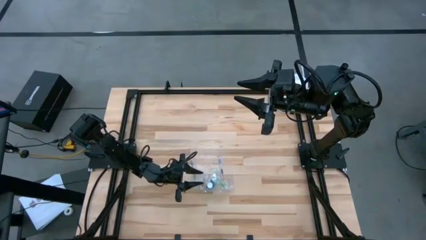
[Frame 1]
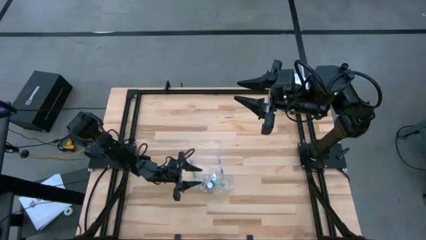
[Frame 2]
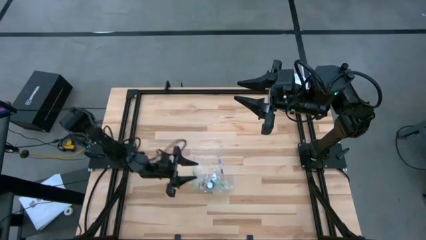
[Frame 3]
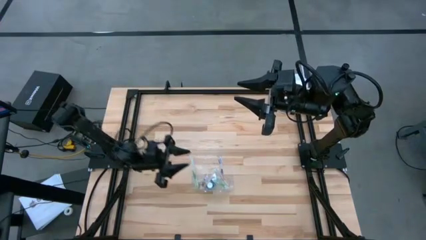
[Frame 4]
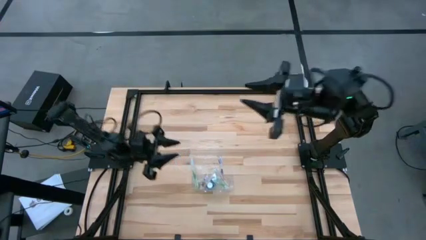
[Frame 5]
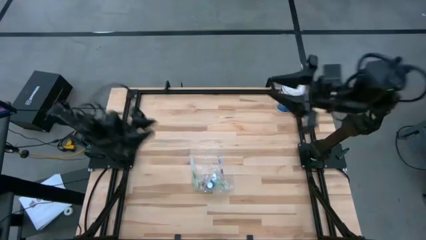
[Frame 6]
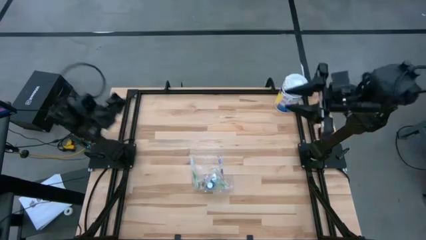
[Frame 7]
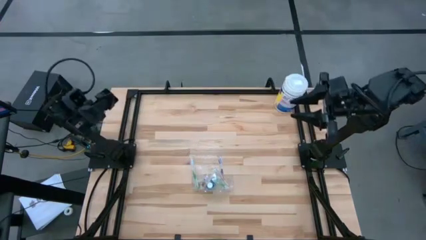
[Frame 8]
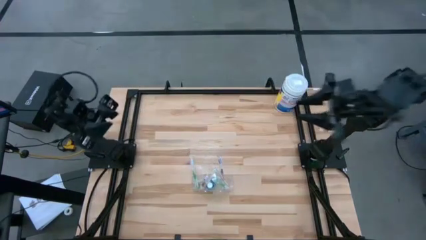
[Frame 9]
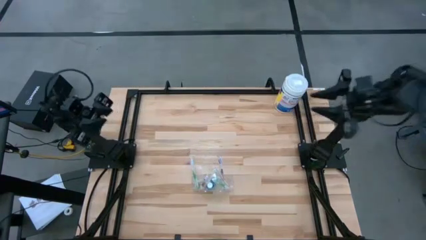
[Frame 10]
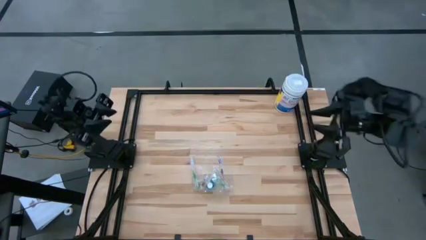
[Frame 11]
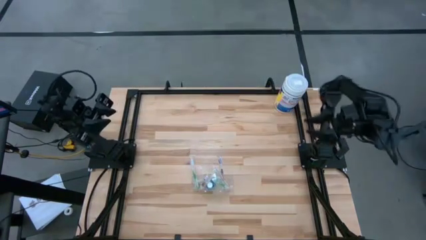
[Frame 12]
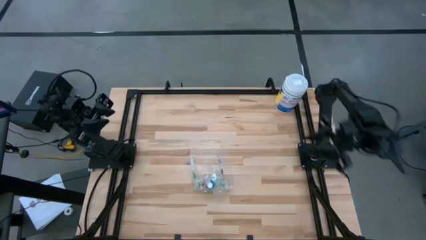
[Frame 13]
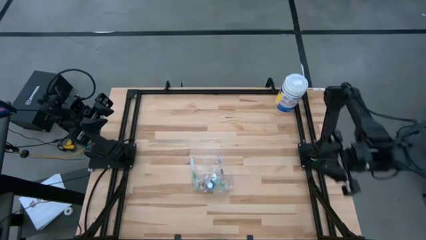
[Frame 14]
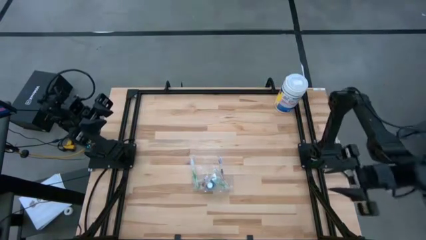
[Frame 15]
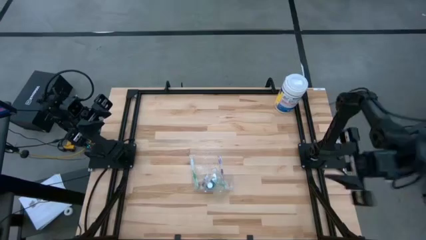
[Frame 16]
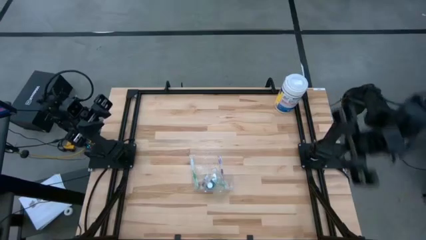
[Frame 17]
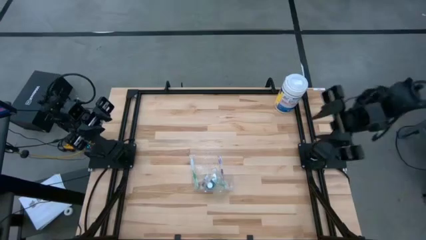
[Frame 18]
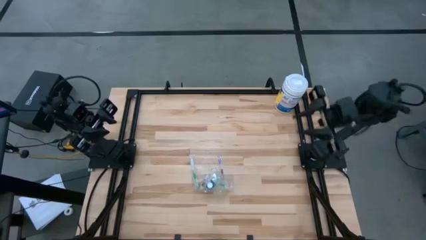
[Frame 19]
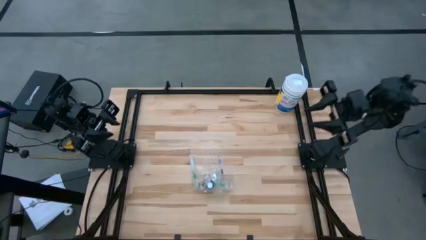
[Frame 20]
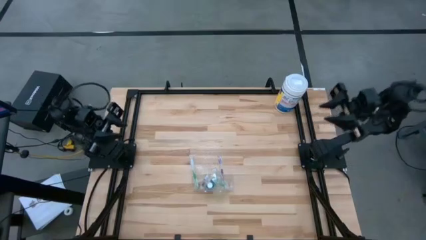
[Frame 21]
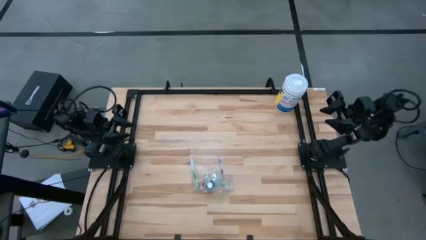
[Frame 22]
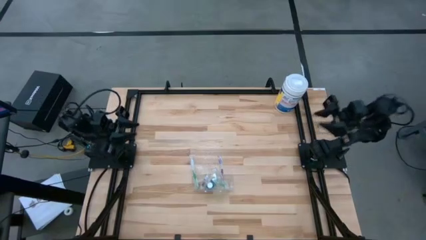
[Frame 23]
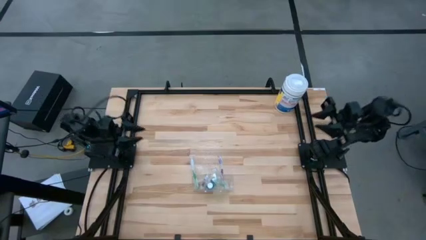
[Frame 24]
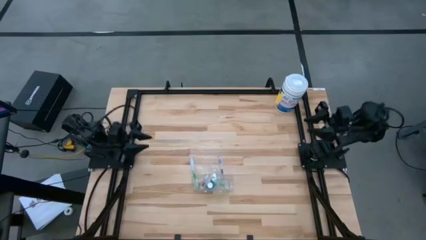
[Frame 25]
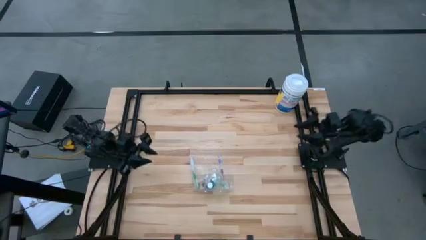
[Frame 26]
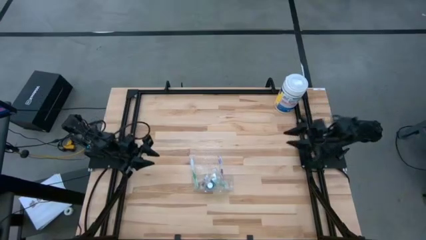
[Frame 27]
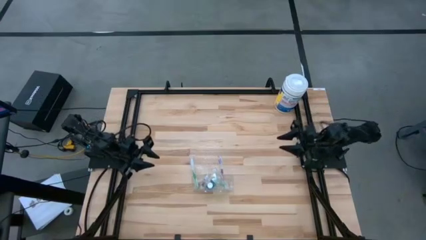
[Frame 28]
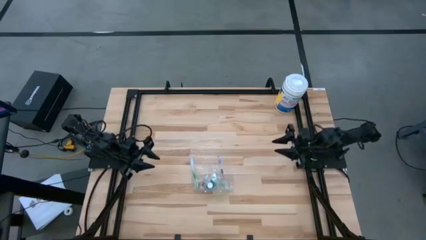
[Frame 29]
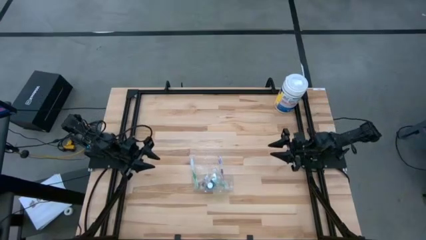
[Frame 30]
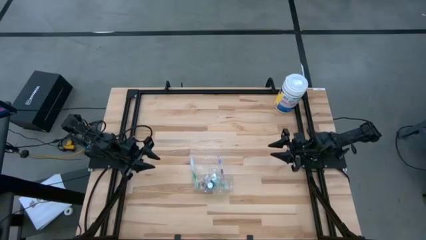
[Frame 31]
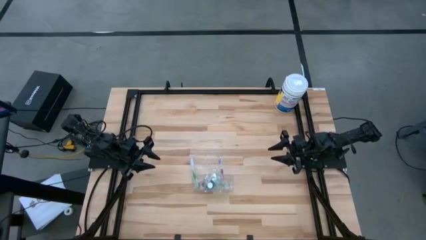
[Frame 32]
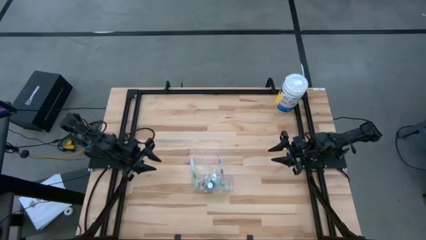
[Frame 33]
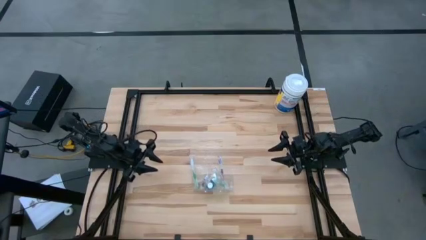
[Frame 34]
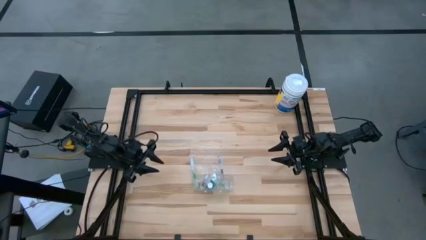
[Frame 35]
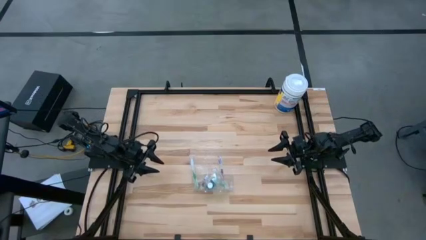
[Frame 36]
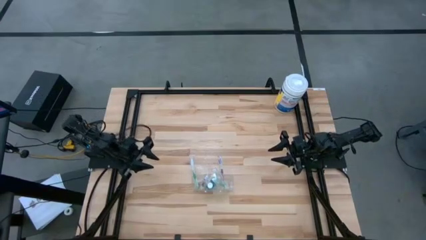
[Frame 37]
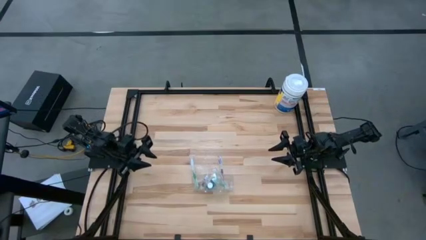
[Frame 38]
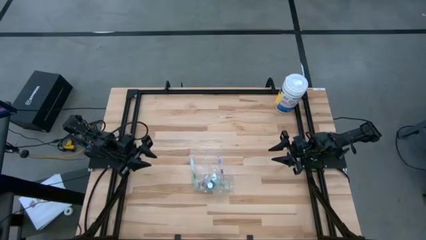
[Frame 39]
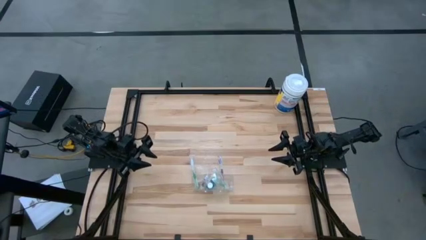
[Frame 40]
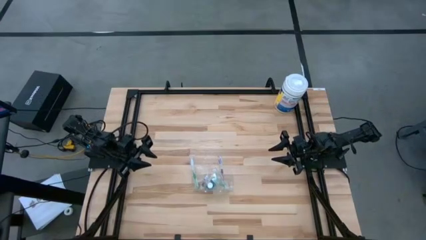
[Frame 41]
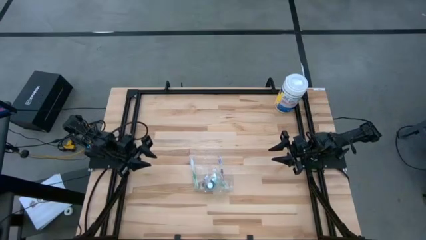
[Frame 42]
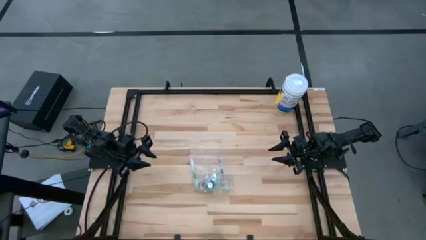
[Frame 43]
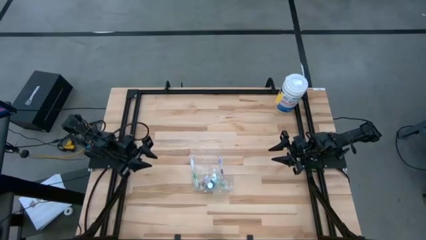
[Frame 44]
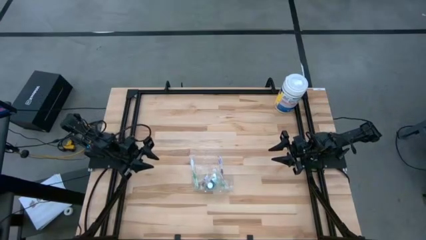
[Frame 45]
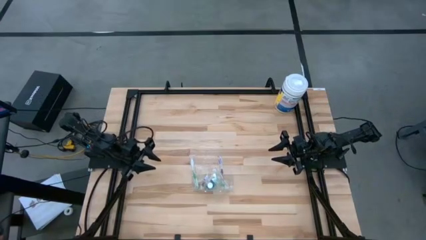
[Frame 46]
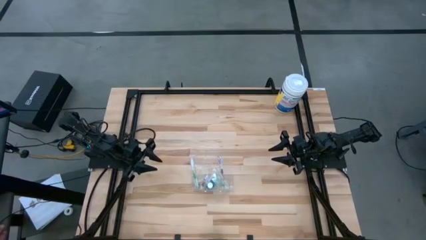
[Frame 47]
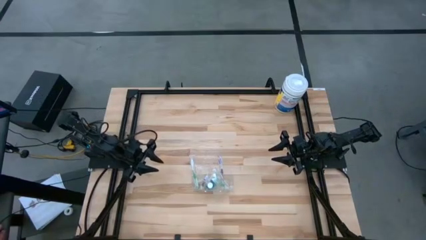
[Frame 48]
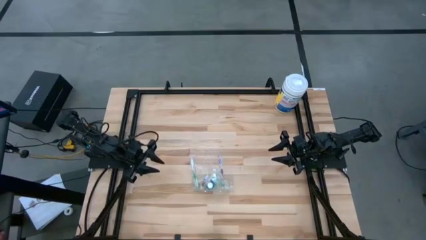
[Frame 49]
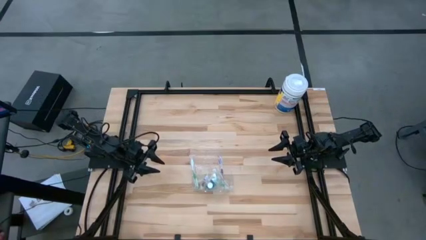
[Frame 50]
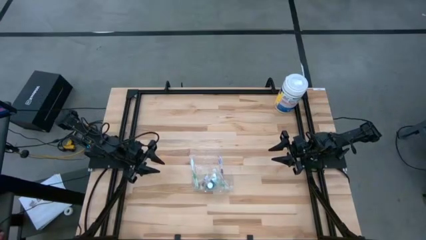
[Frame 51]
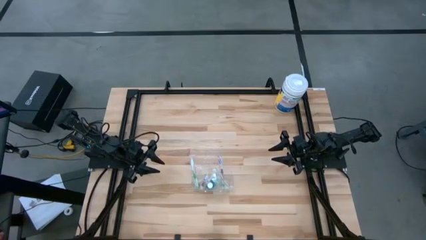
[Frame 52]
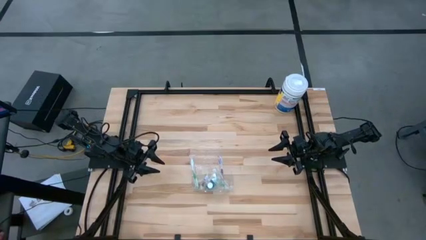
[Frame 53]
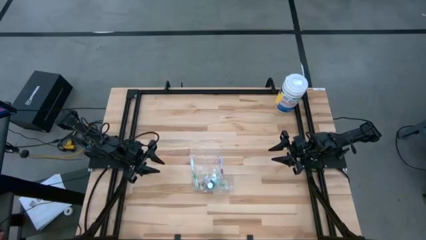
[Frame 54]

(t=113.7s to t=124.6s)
Task: Pick & Place toothbrushing station
Return to Home Position

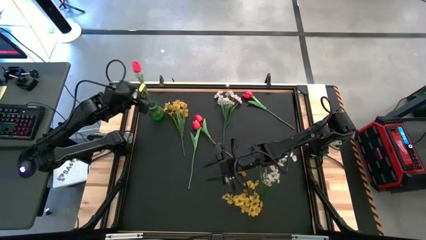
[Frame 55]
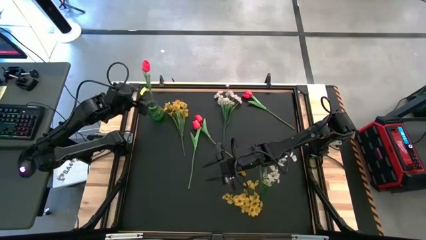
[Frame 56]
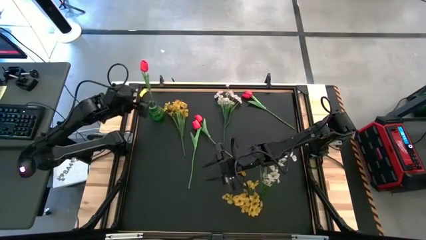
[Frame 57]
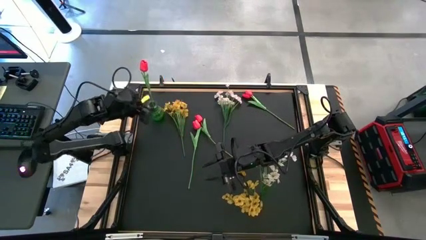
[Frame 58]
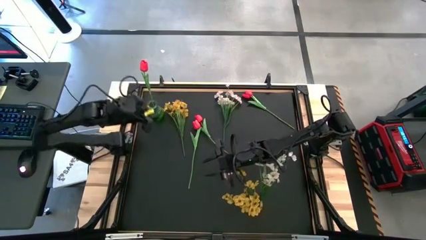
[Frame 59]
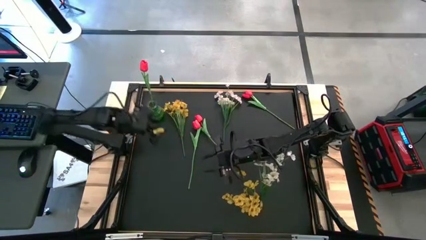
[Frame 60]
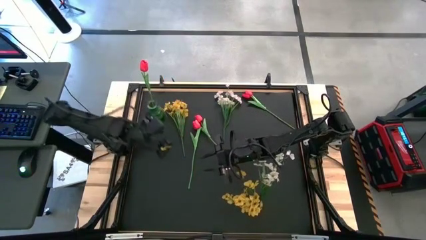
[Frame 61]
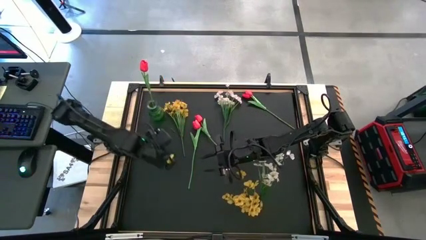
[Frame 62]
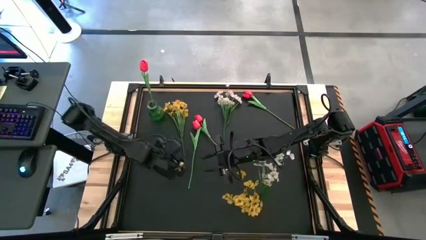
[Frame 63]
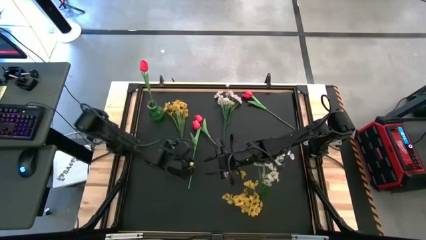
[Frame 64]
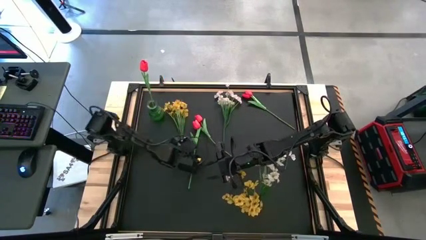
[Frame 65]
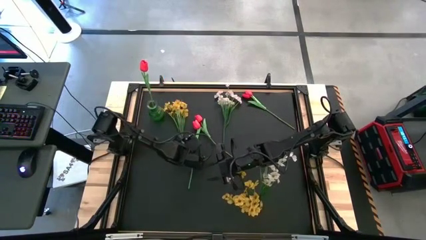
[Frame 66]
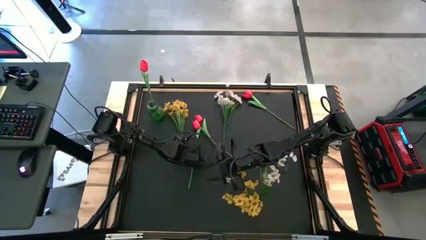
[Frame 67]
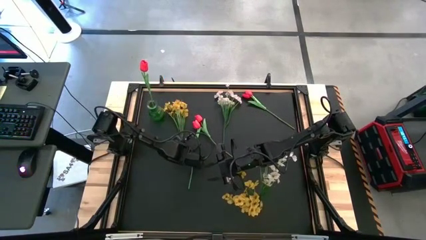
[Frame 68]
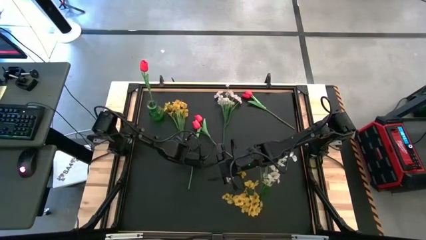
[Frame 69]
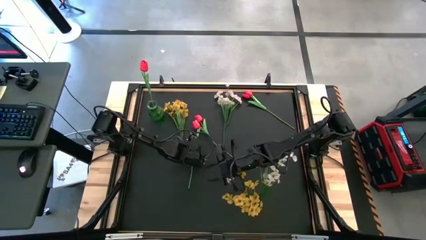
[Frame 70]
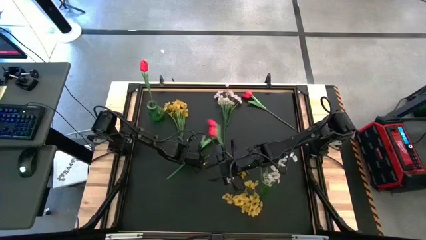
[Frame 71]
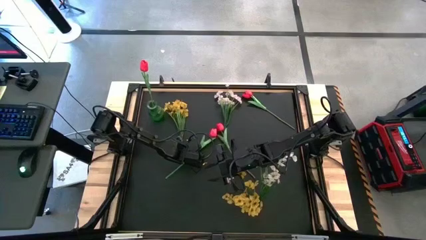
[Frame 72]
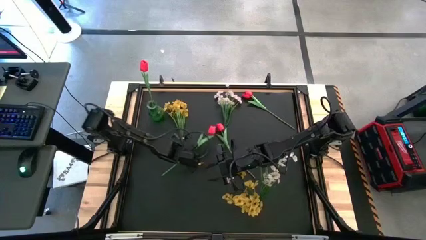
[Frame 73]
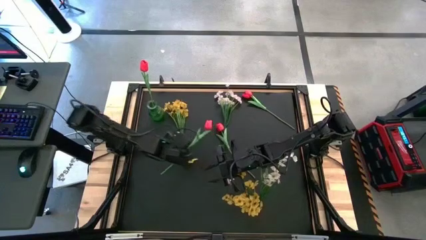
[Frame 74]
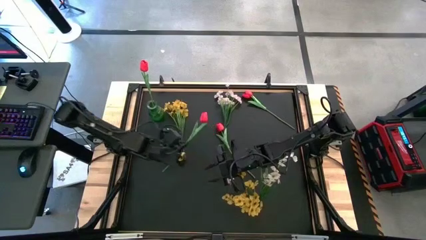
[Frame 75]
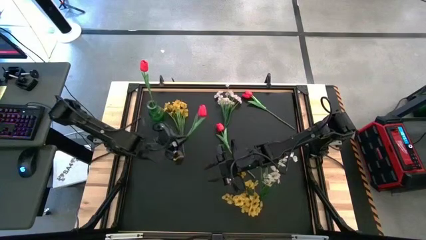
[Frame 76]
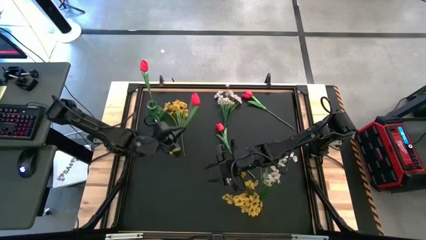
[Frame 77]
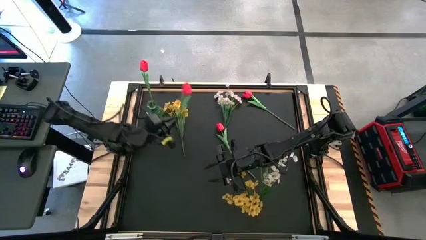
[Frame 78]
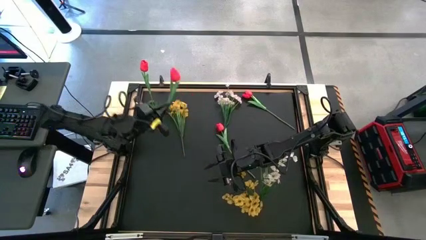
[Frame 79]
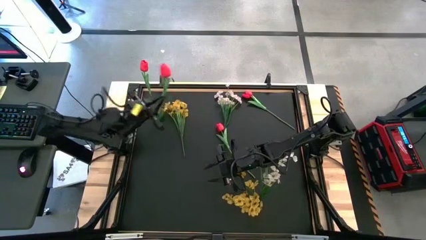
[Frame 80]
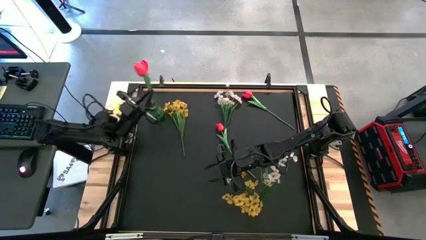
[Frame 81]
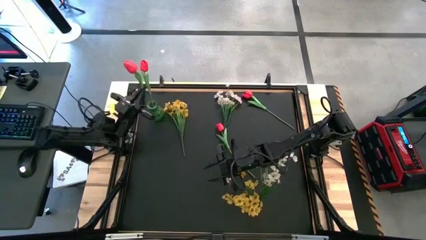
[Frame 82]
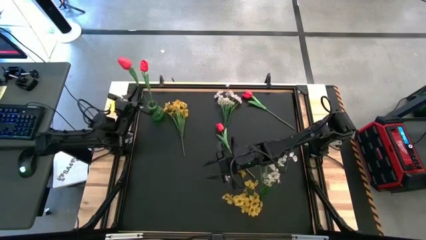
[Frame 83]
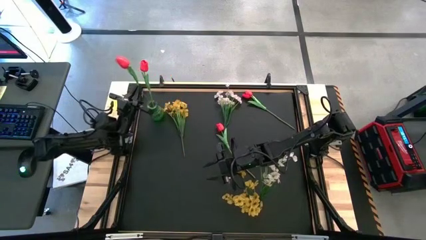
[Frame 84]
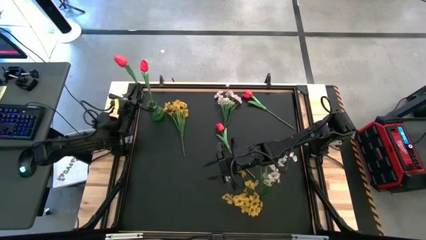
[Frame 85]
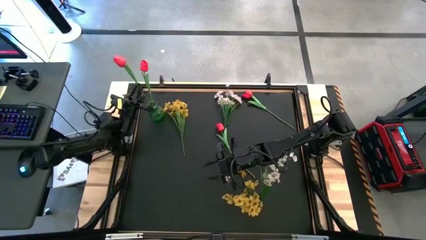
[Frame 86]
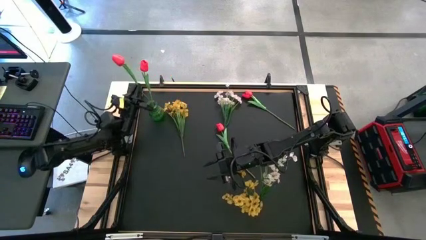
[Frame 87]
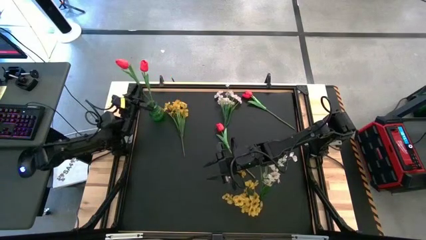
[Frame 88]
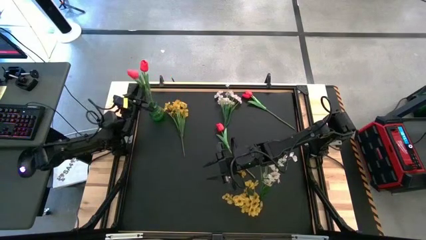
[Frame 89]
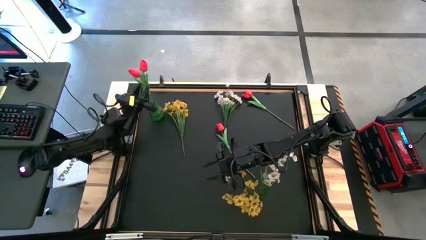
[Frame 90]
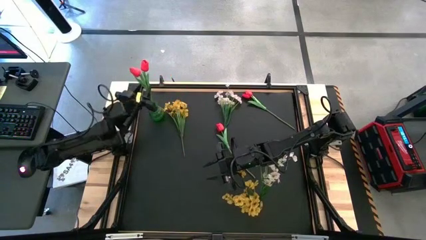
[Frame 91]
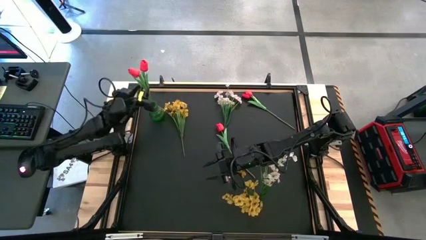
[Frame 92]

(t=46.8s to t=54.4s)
Task: Sort flowers into vase by color
Put the red tulip into the green vase
